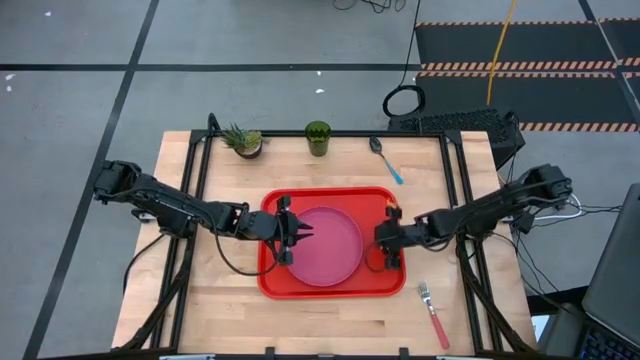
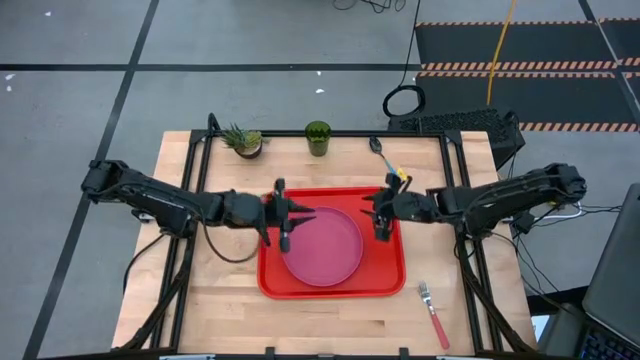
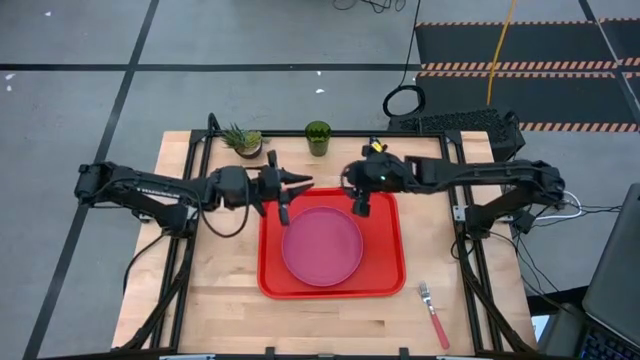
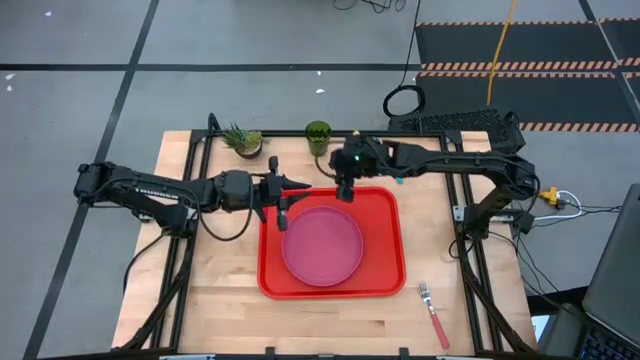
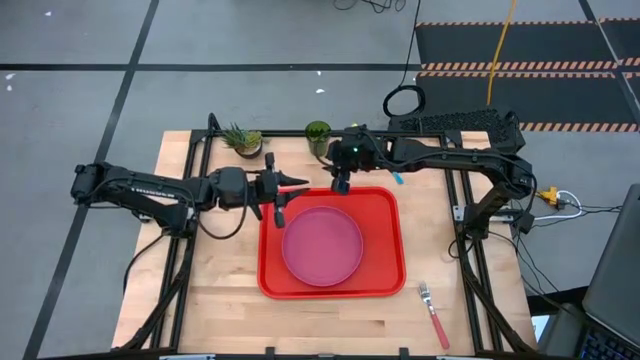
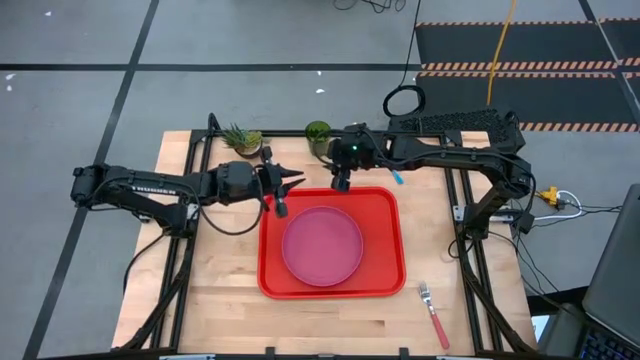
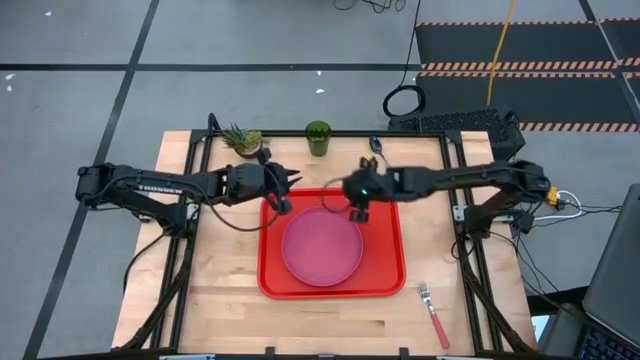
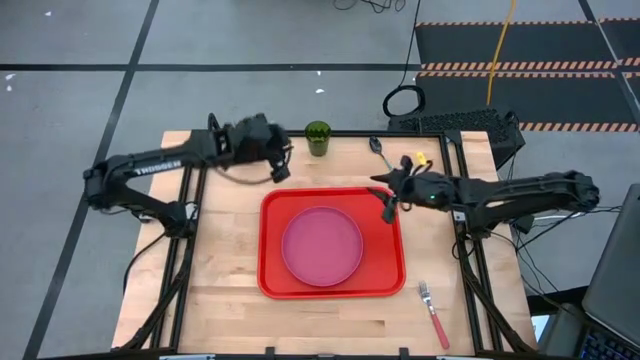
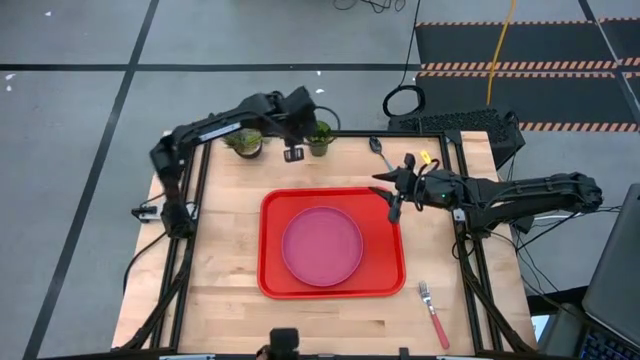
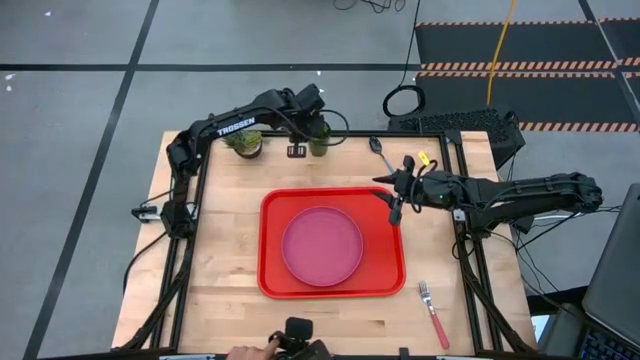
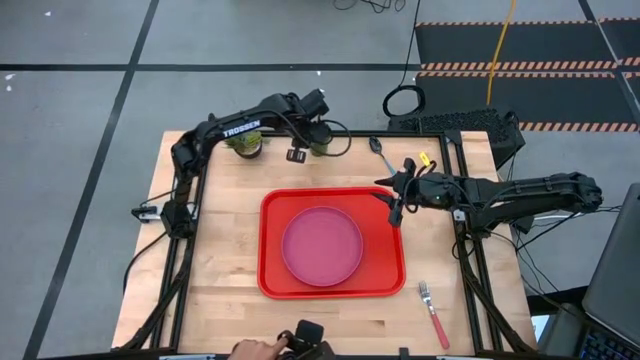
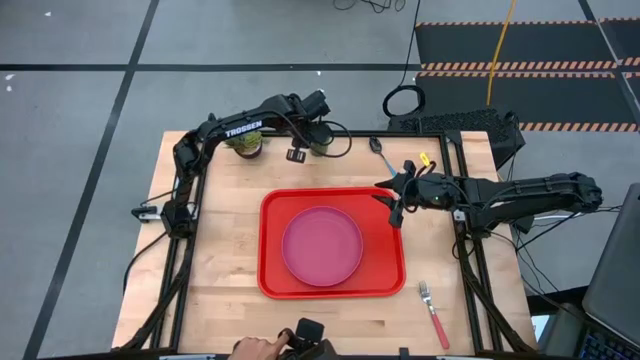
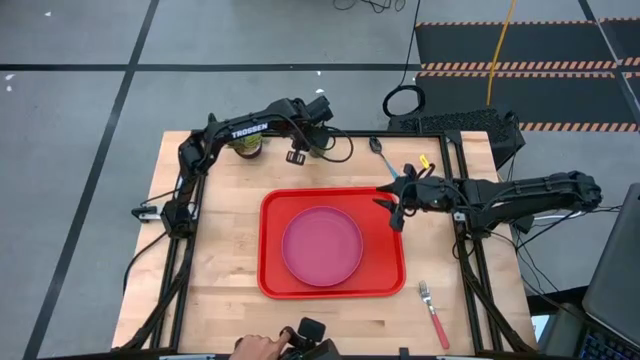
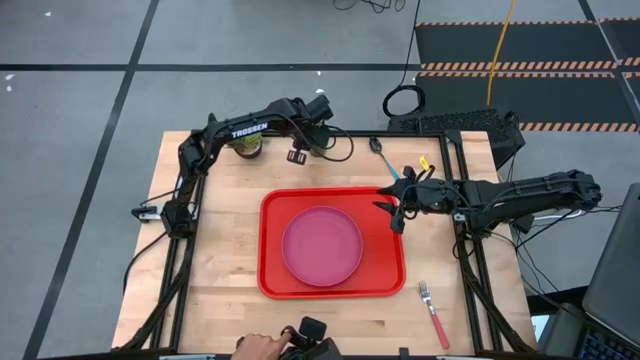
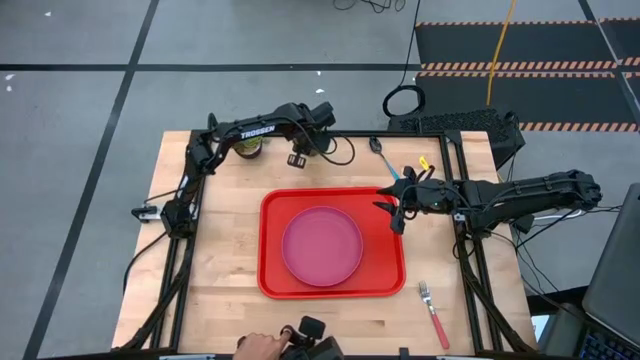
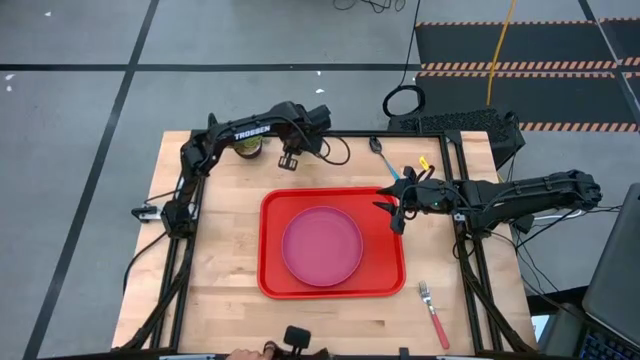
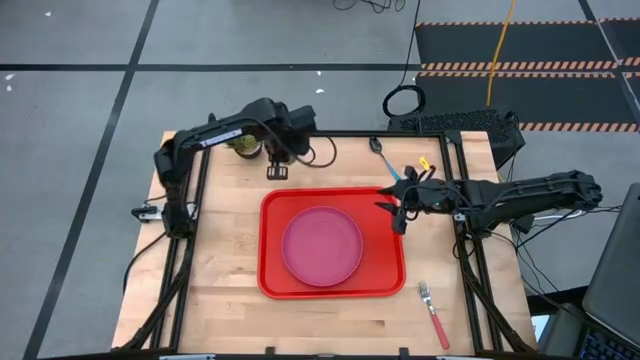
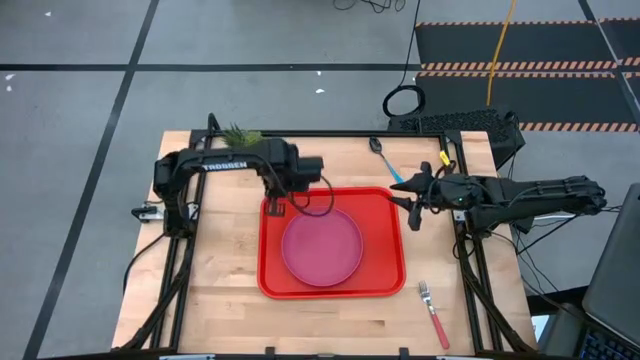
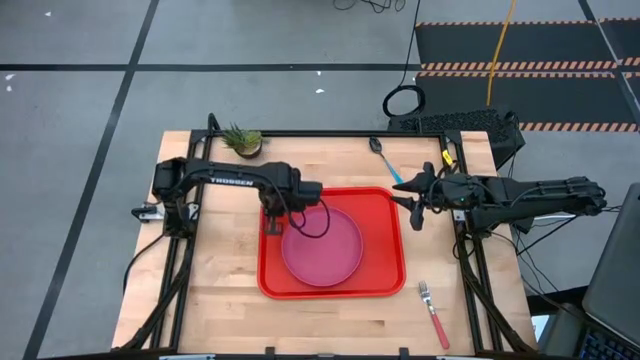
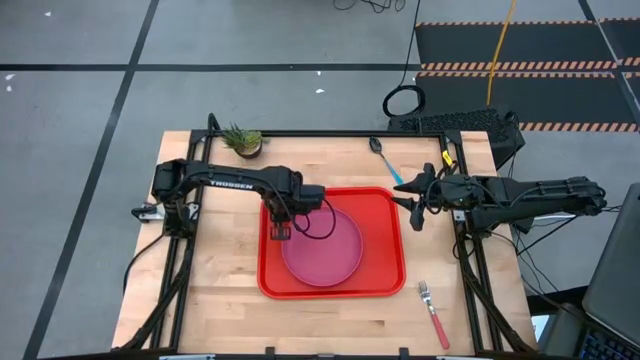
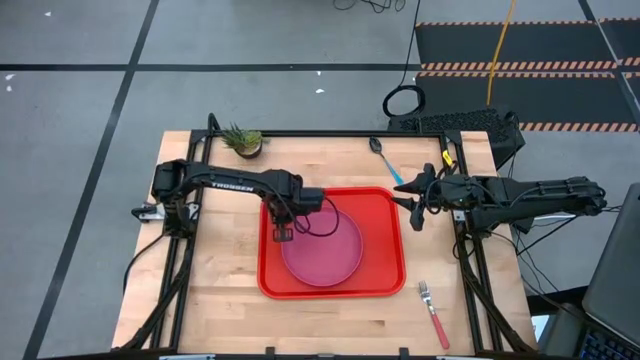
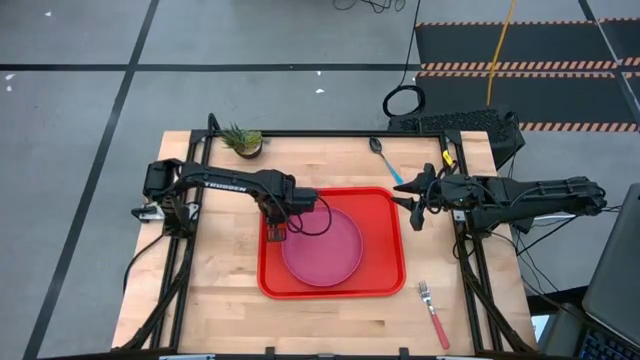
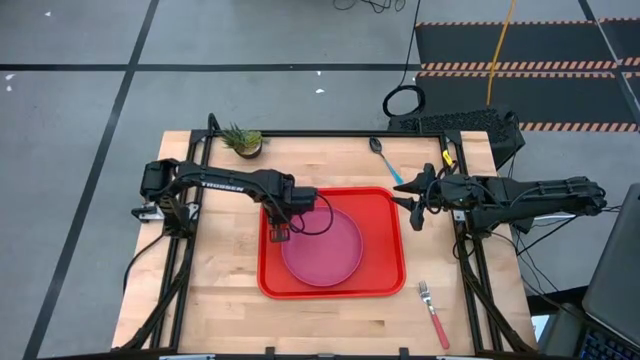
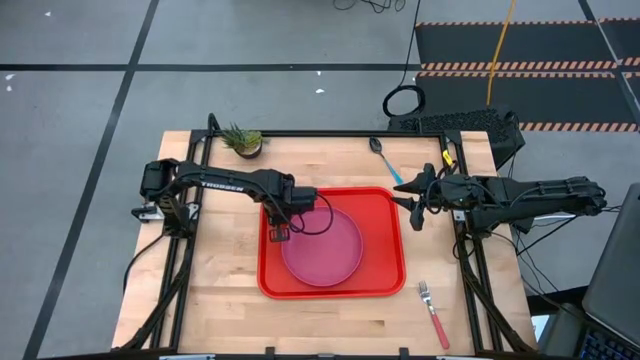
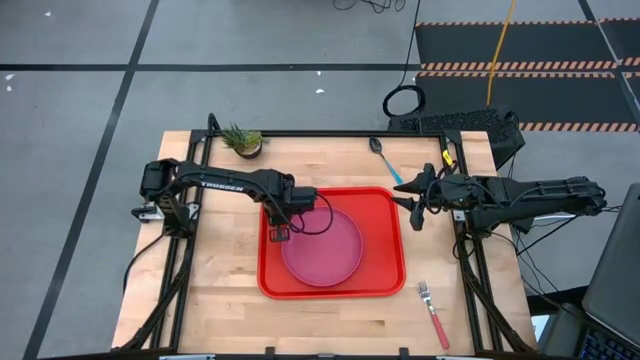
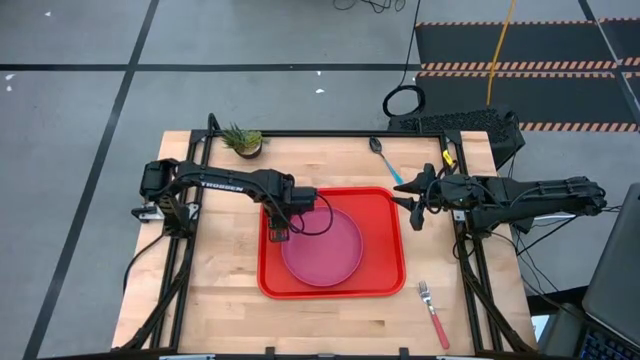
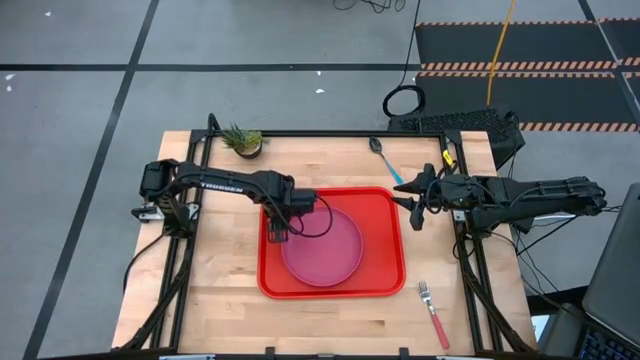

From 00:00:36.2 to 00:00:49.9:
Task: Pick and place plate/cup/fork/spoon on tray
Put the green cup on the red serving tray to the top left of the pink plate

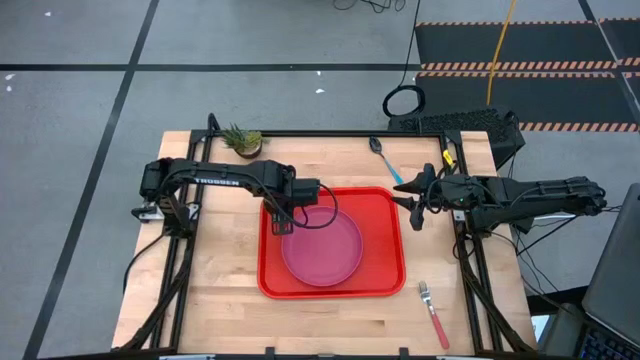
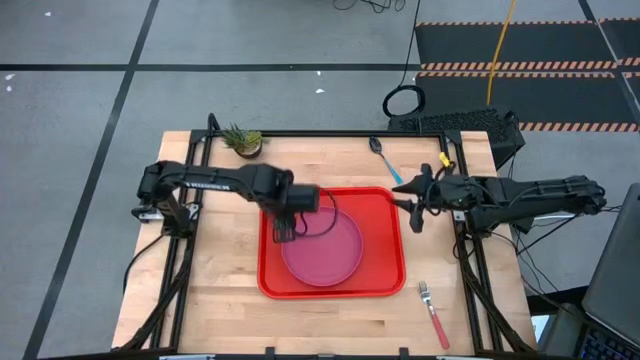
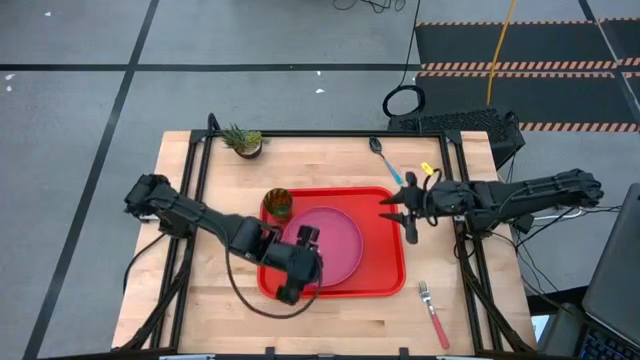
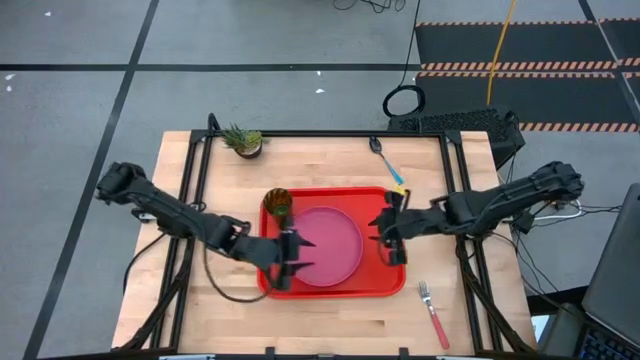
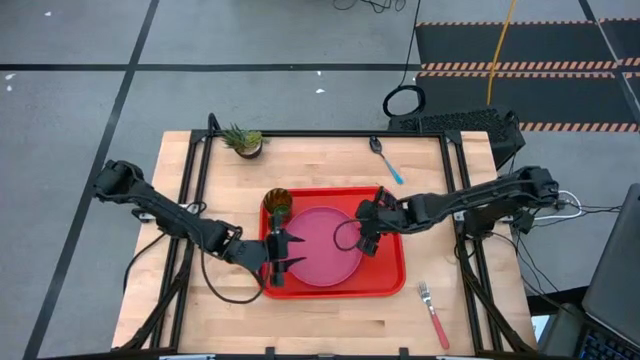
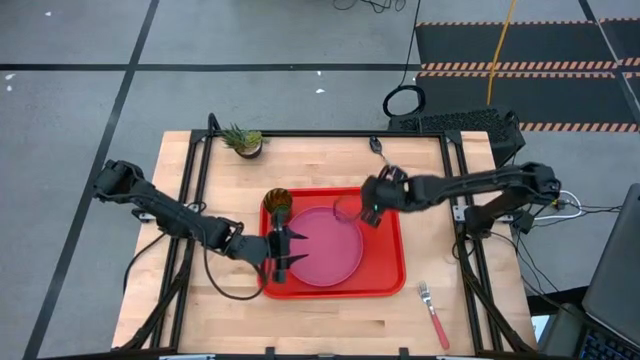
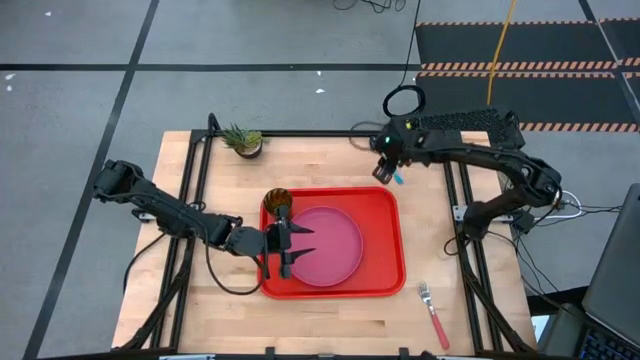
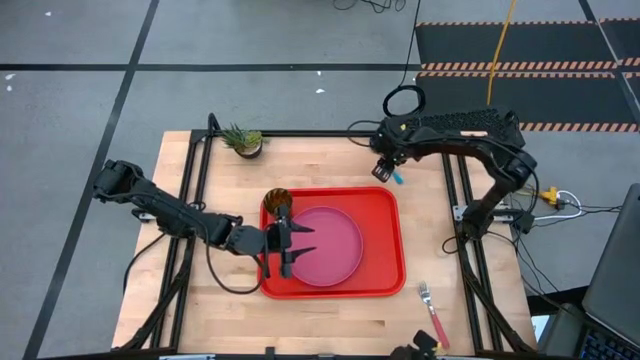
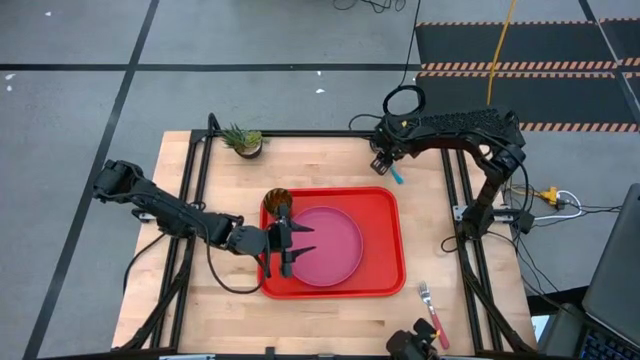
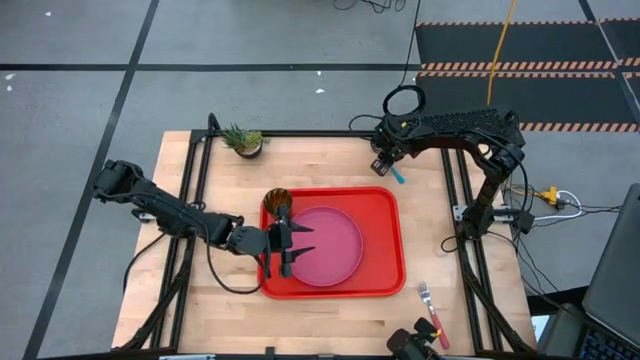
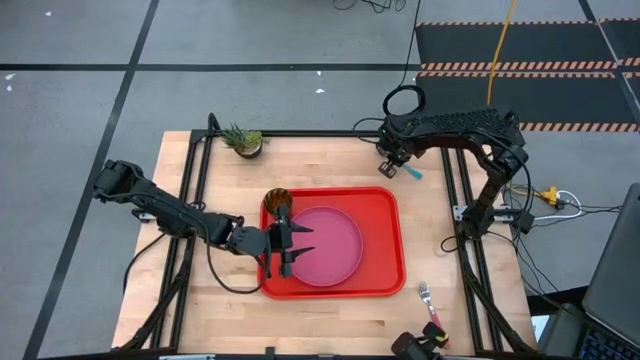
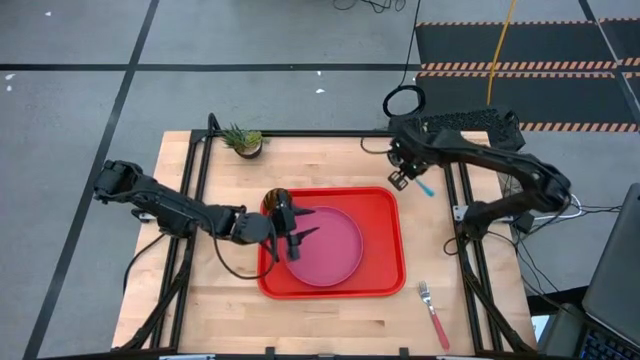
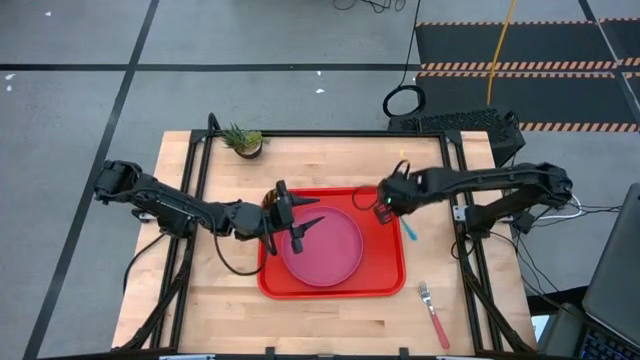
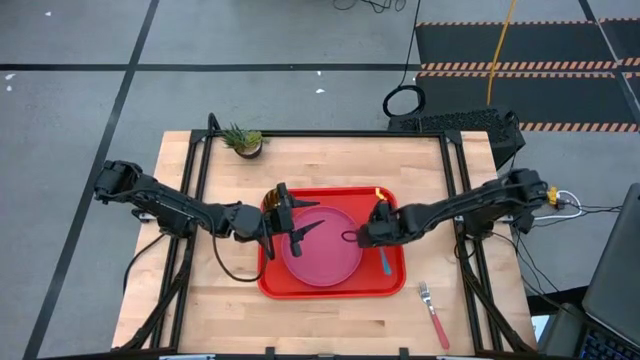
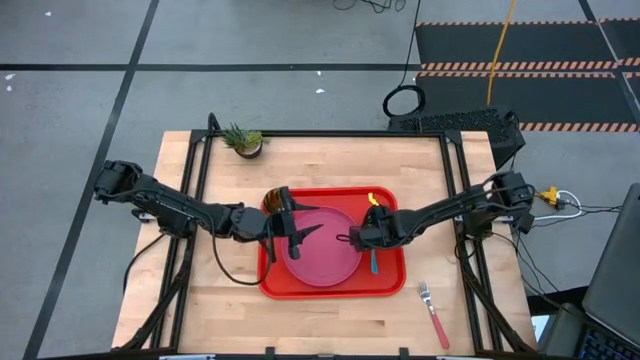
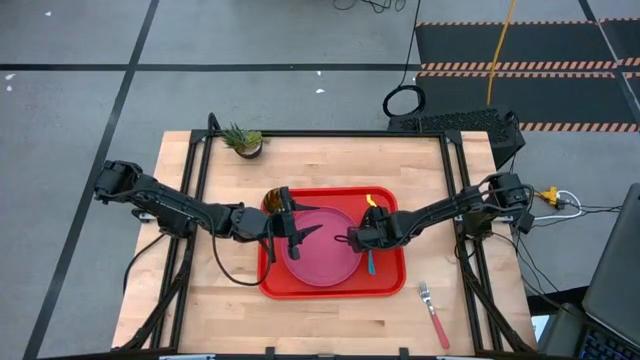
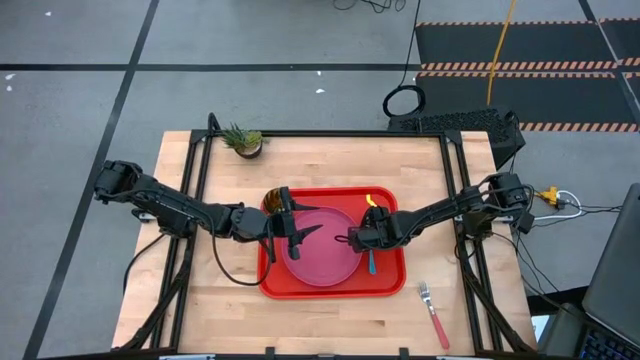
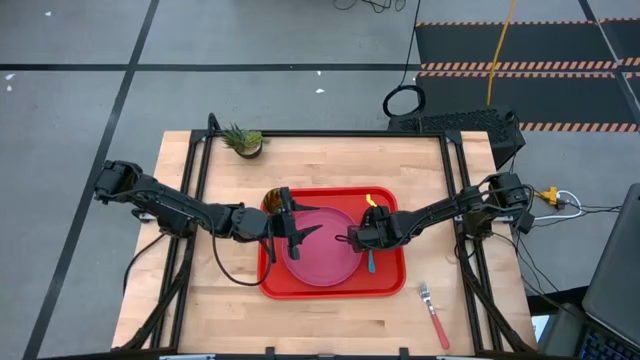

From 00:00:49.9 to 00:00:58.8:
Put the blue spoon on the red serving tray to the right of the pink plate
